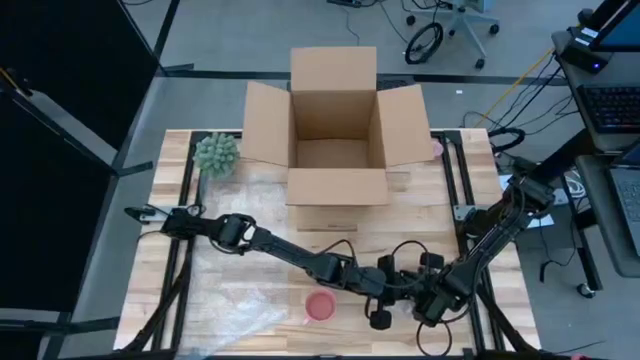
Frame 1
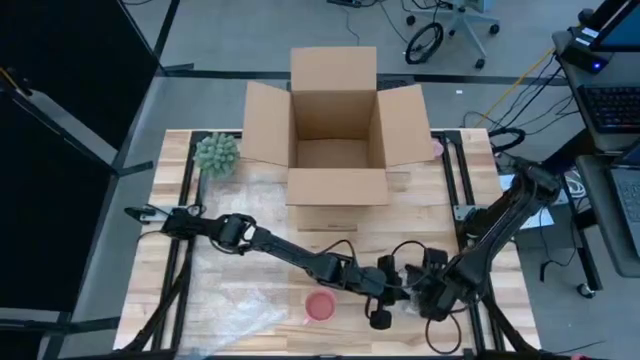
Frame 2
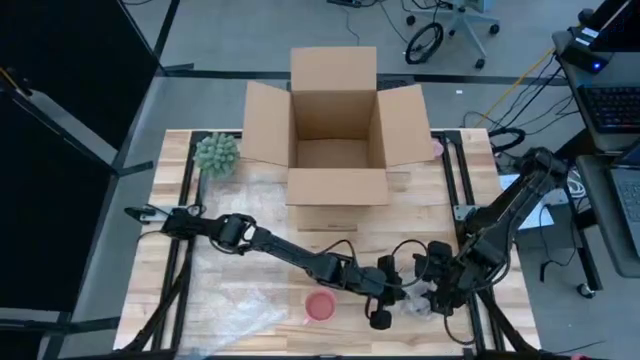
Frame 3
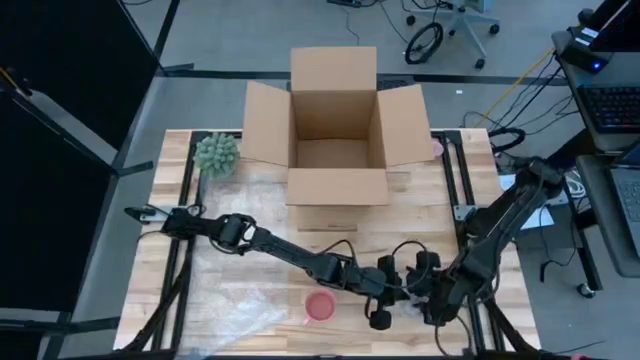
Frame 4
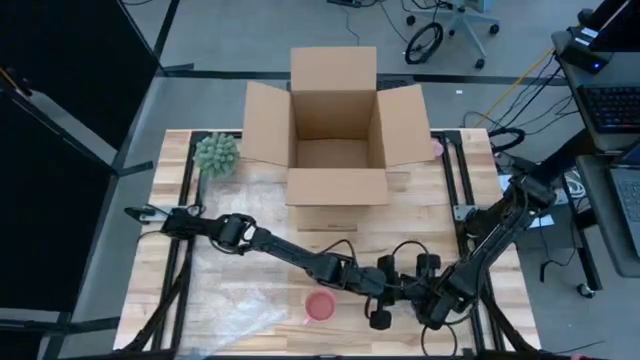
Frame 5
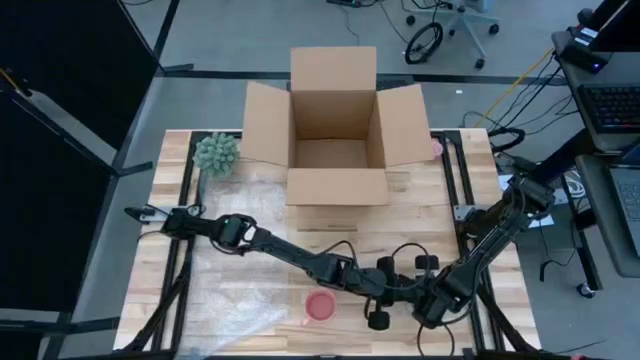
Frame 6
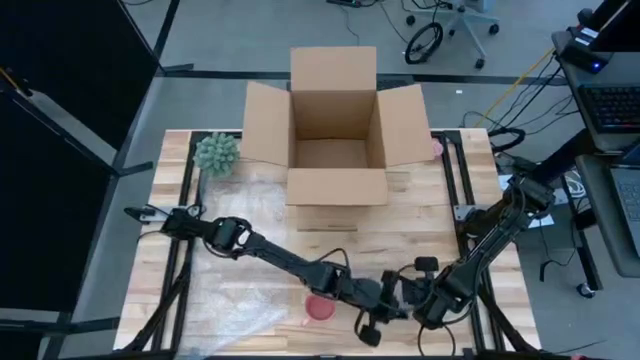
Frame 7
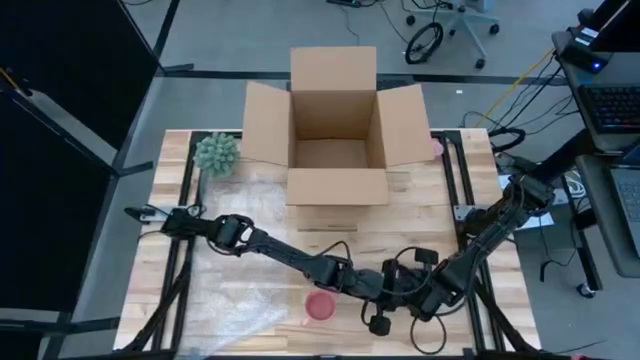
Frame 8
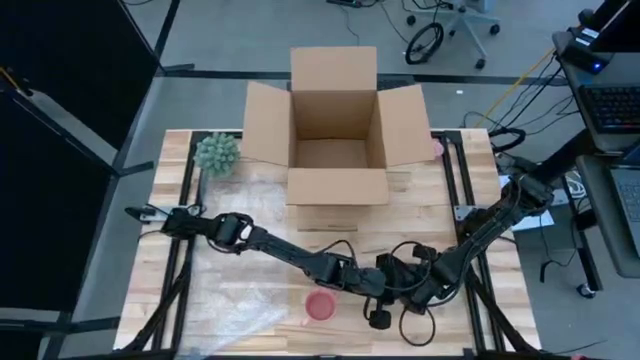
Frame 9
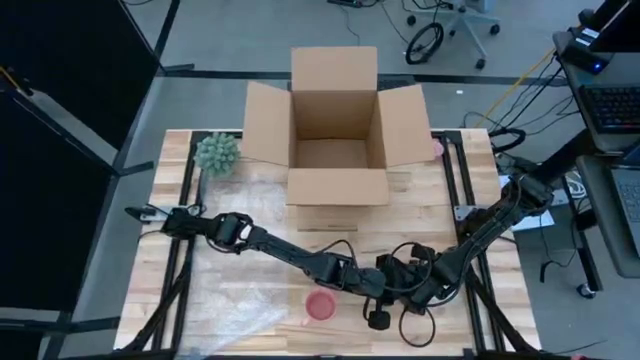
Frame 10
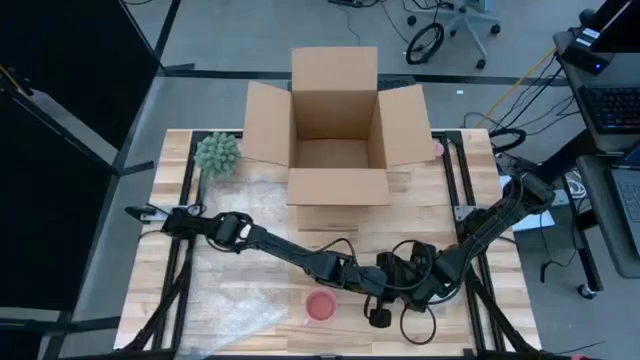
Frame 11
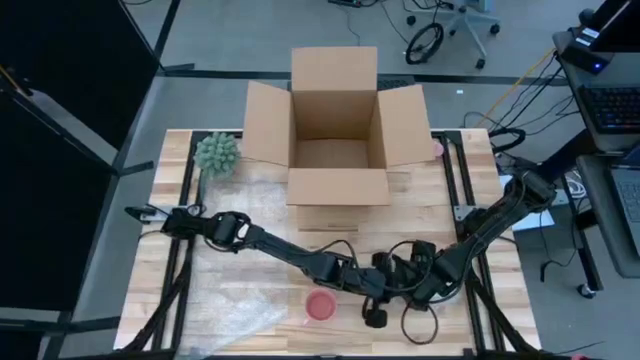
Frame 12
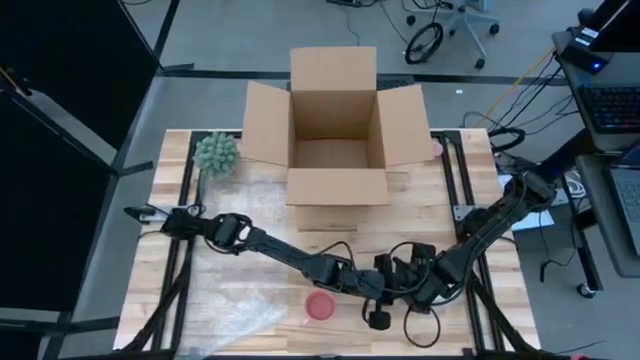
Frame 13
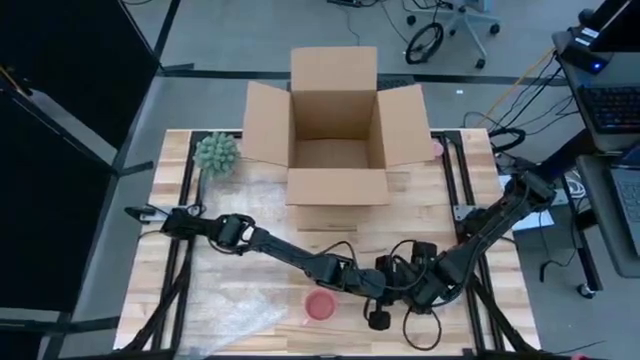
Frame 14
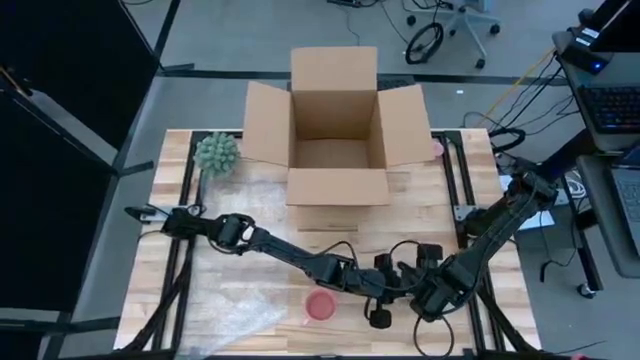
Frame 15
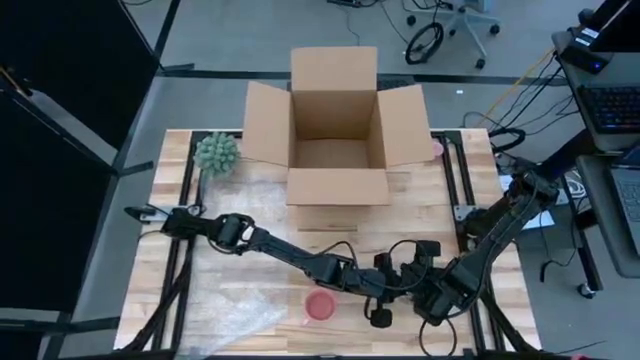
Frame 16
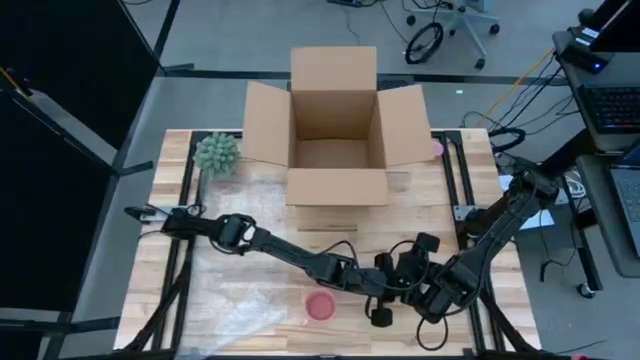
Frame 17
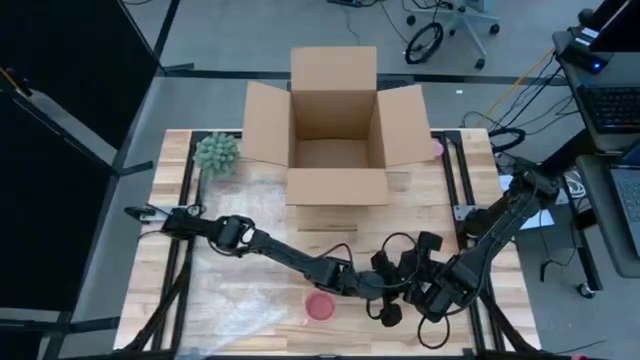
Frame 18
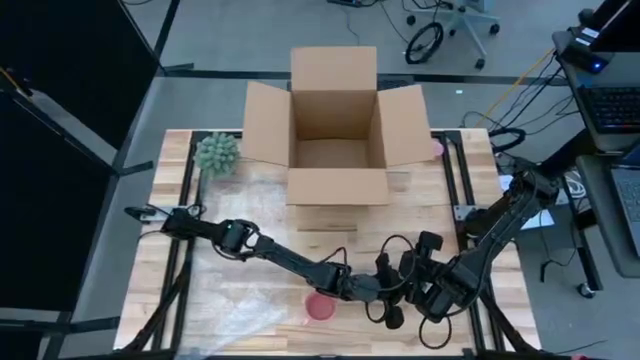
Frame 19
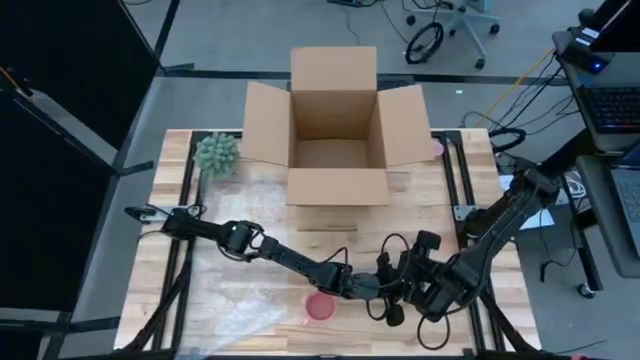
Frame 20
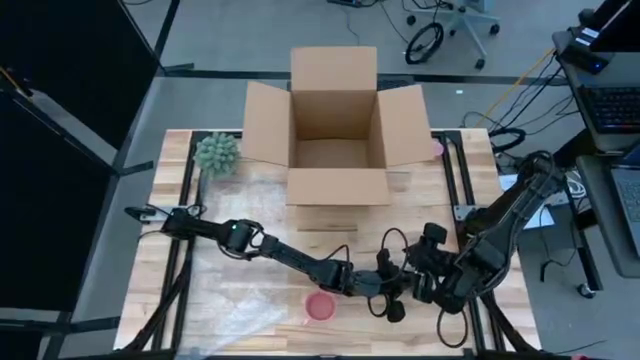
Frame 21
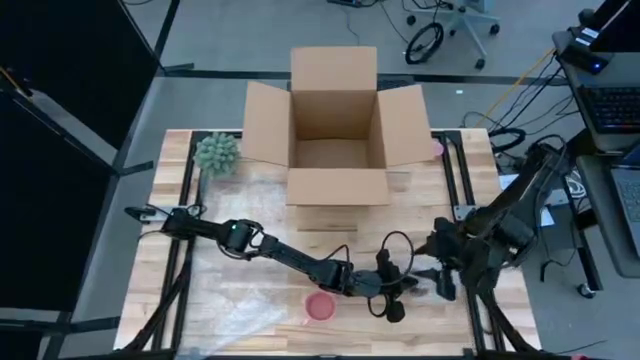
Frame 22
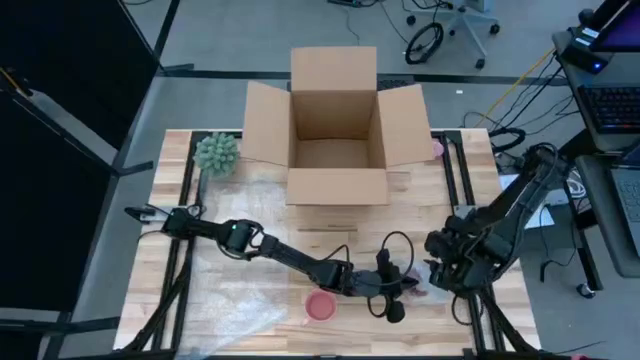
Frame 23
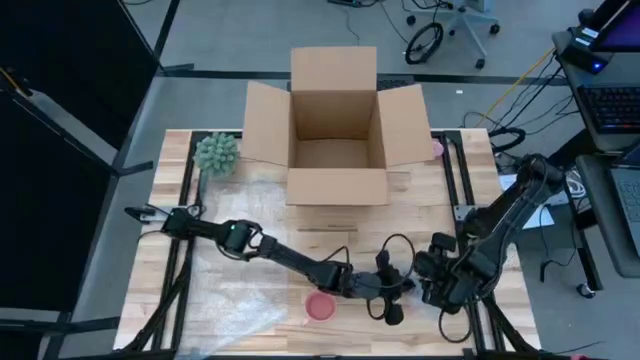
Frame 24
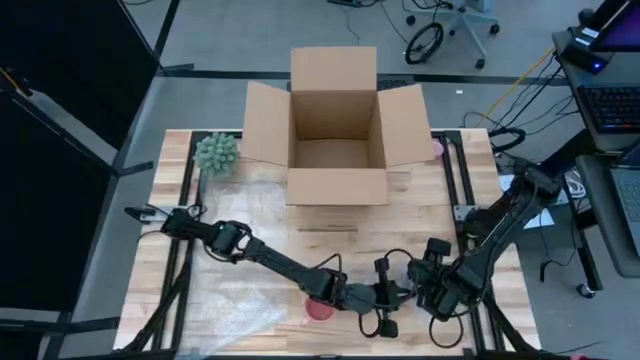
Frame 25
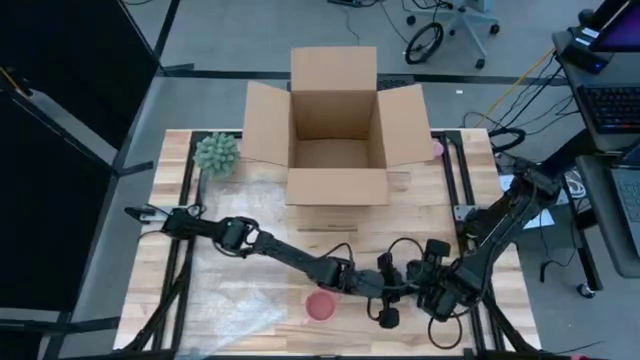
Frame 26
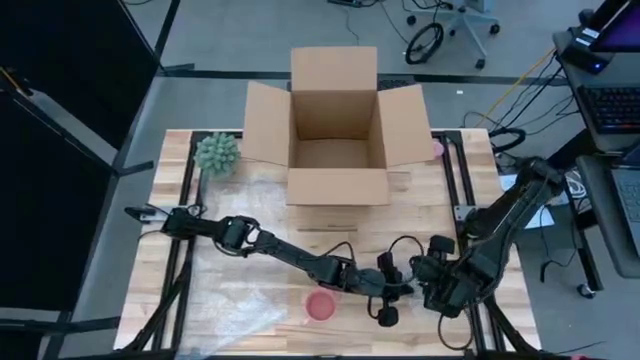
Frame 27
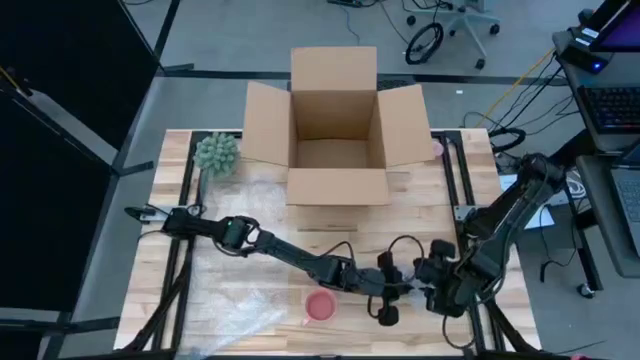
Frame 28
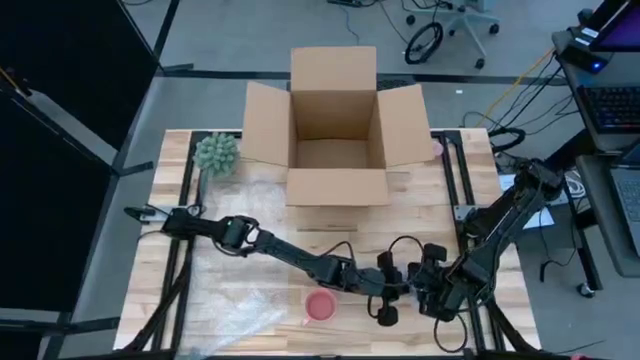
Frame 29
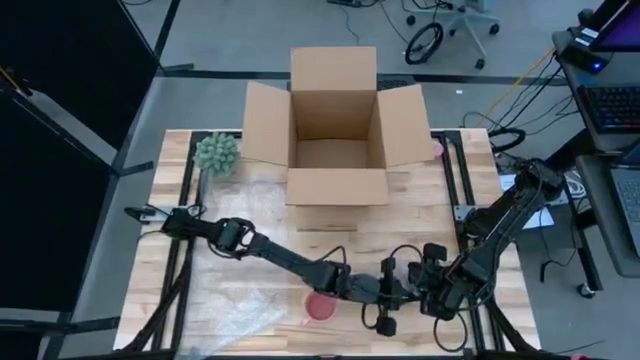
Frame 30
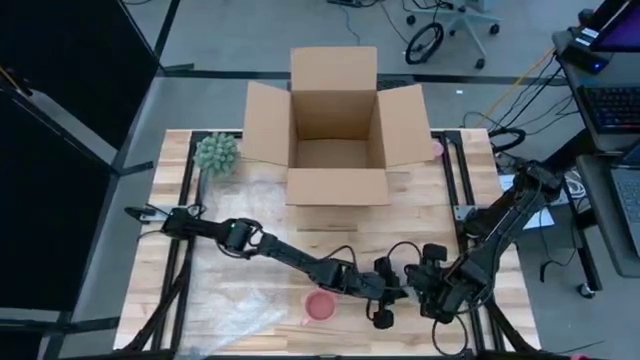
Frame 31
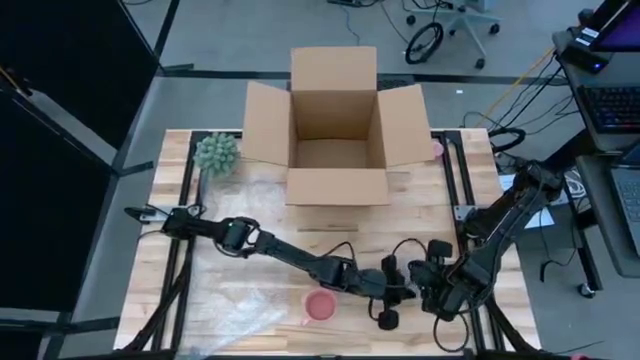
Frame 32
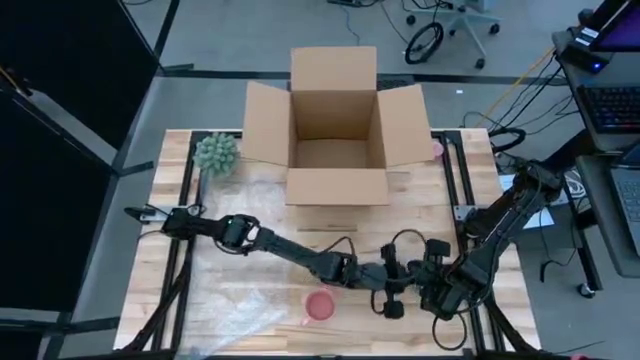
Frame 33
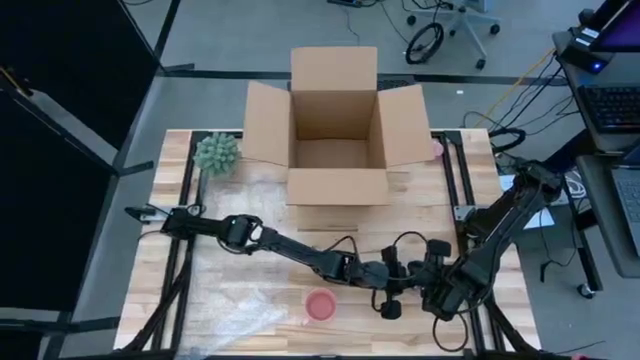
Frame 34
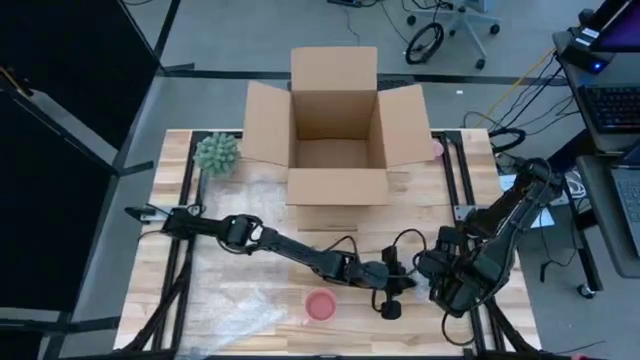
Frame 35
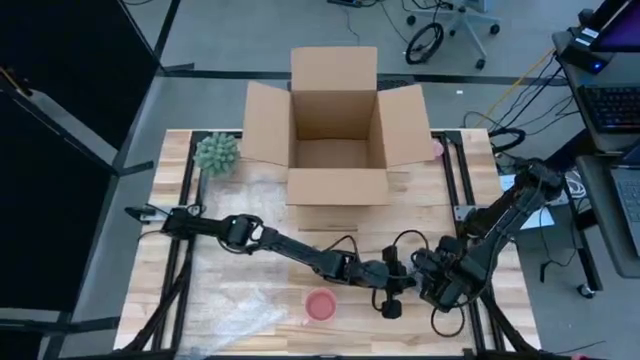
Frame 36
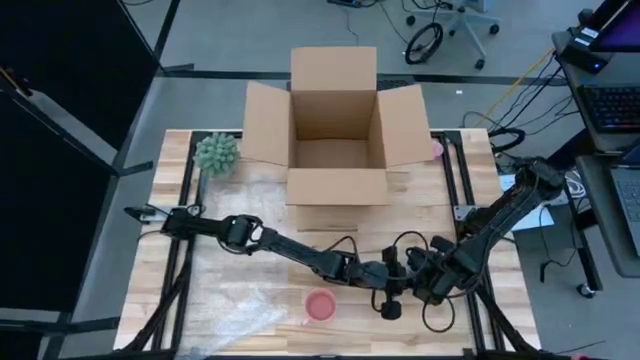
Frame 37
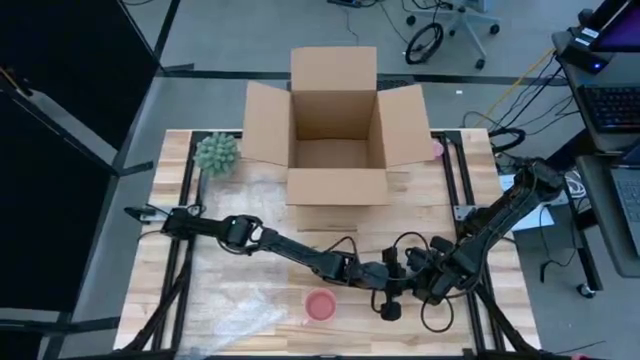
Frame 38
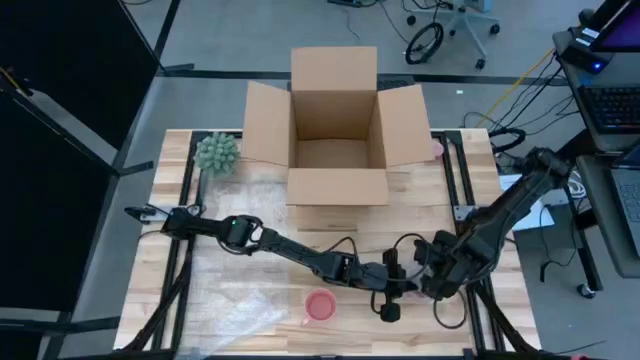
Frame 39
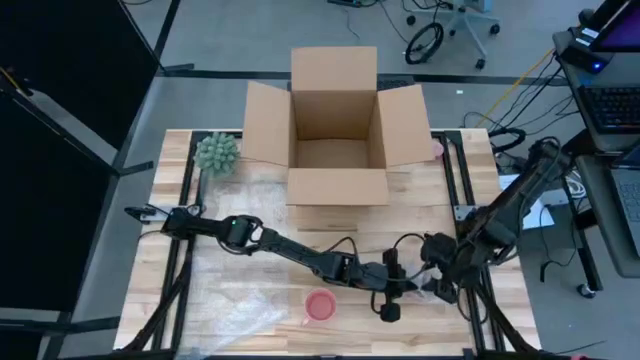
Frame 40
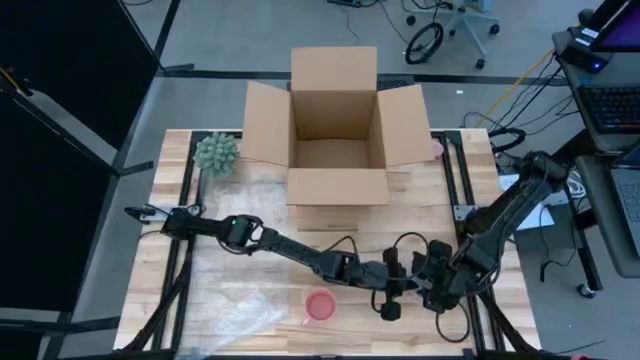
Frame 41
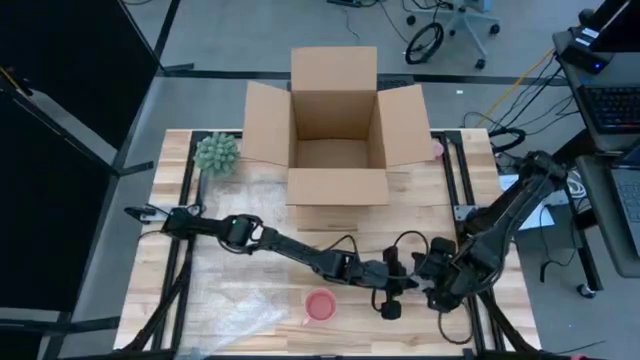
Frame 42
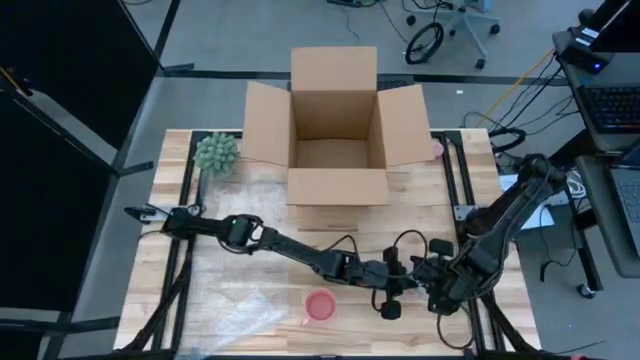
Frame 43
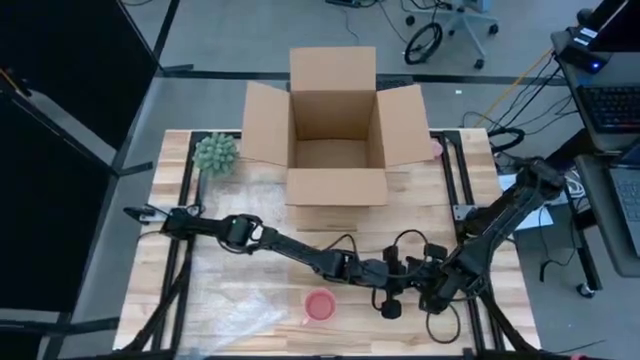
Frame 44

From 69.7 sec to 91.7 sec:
Task: wrap mug
Wrap the yellow mug with bubble wrap
